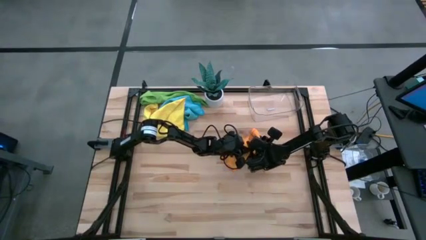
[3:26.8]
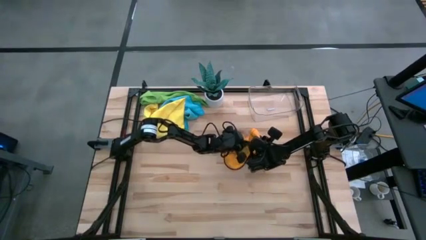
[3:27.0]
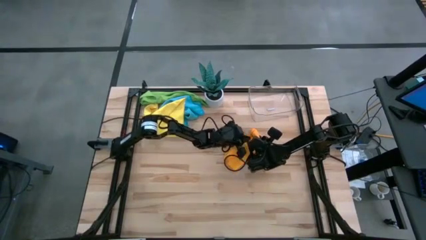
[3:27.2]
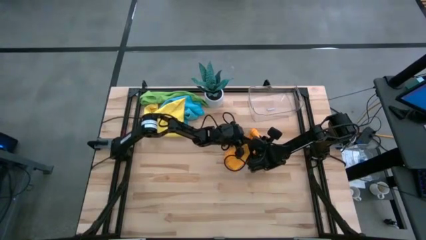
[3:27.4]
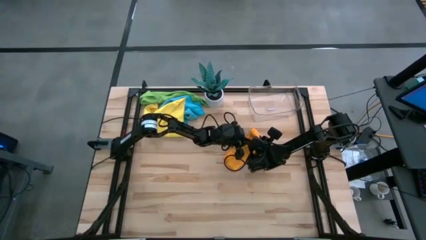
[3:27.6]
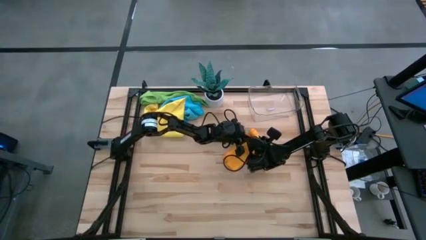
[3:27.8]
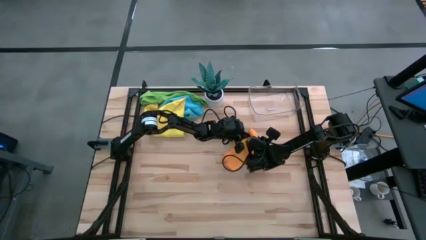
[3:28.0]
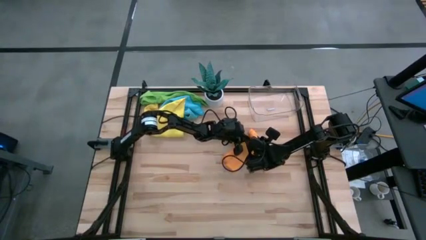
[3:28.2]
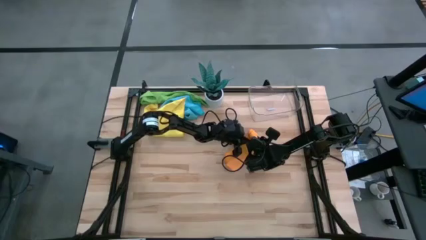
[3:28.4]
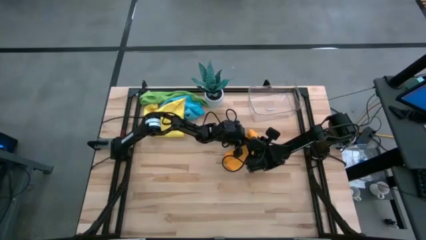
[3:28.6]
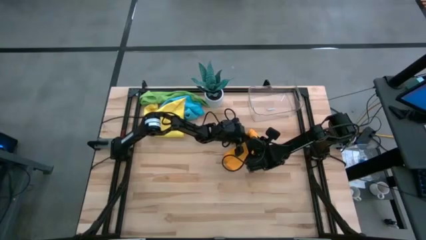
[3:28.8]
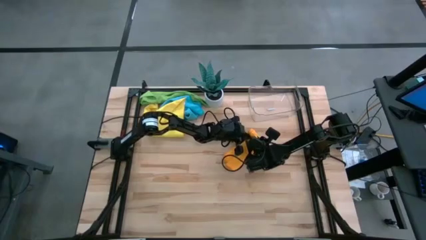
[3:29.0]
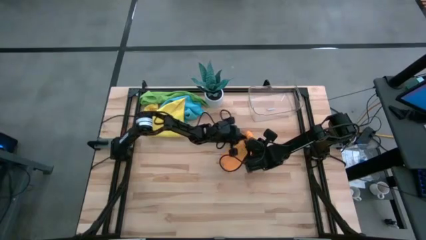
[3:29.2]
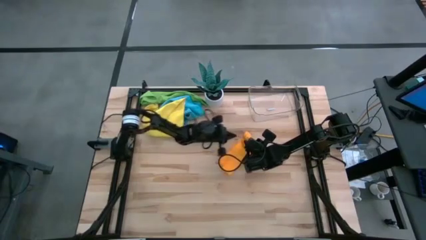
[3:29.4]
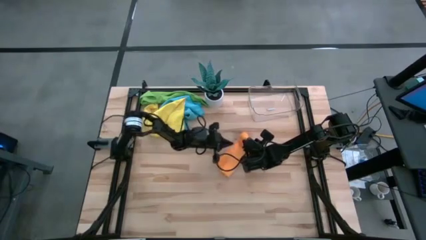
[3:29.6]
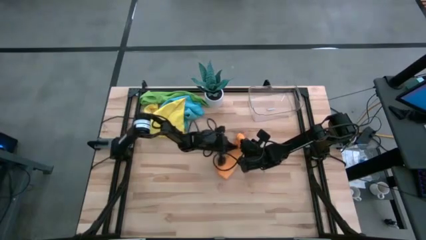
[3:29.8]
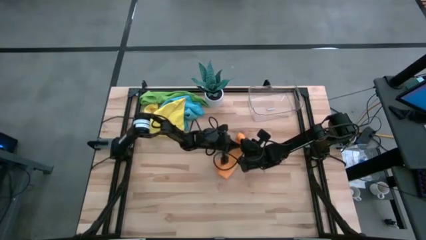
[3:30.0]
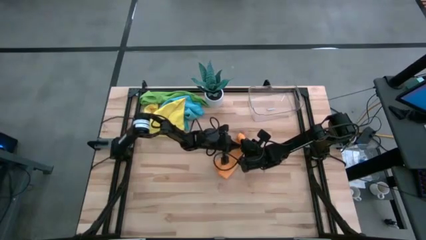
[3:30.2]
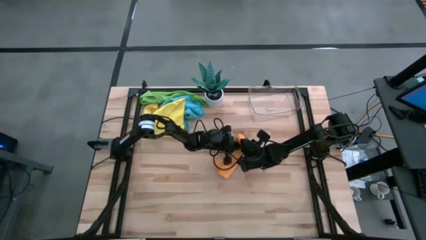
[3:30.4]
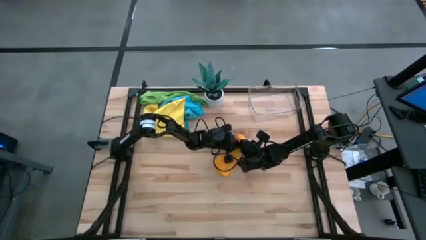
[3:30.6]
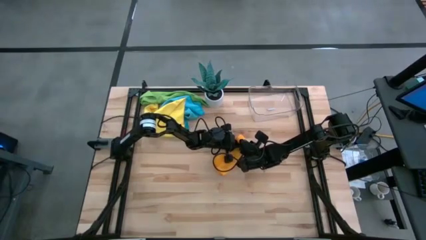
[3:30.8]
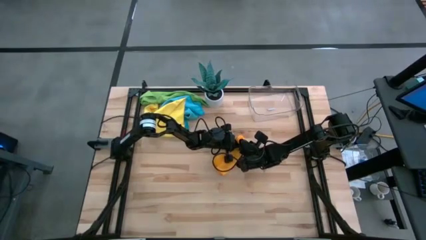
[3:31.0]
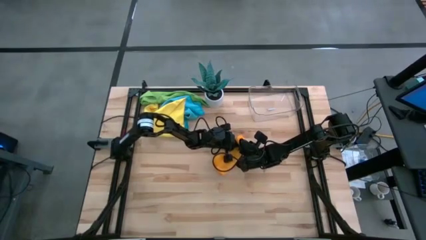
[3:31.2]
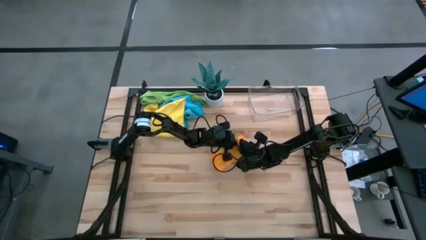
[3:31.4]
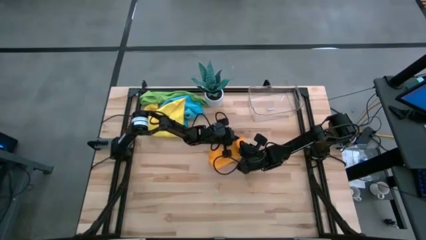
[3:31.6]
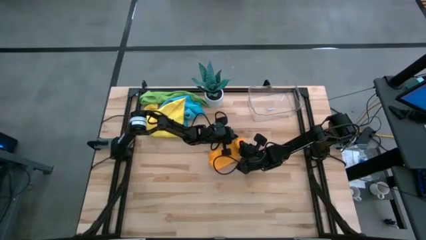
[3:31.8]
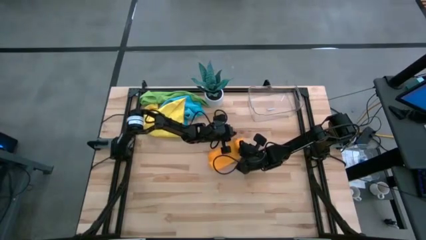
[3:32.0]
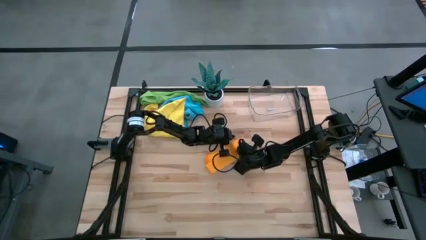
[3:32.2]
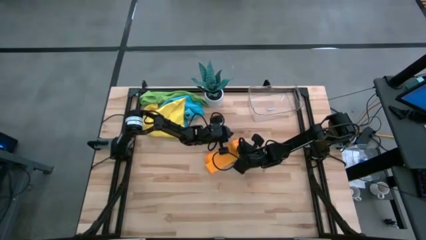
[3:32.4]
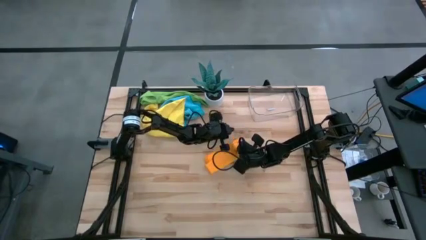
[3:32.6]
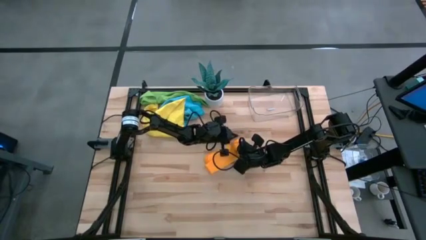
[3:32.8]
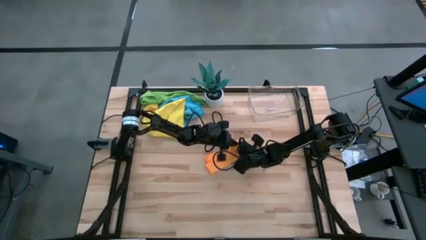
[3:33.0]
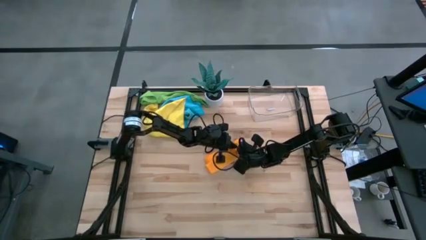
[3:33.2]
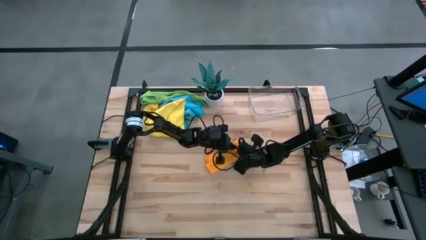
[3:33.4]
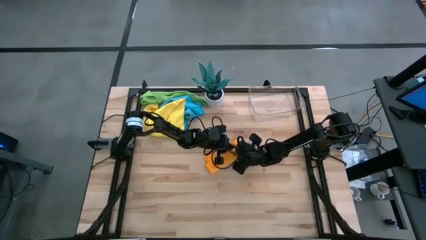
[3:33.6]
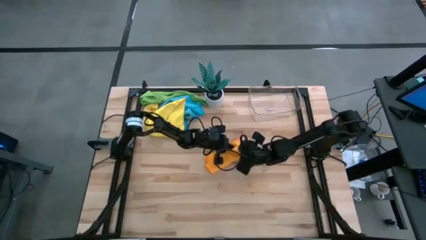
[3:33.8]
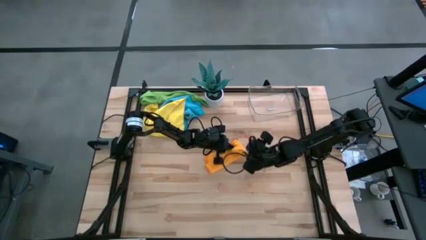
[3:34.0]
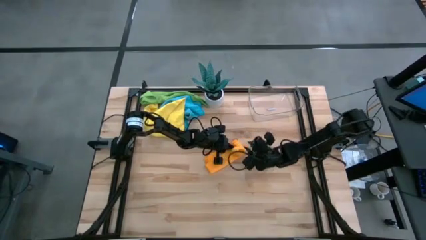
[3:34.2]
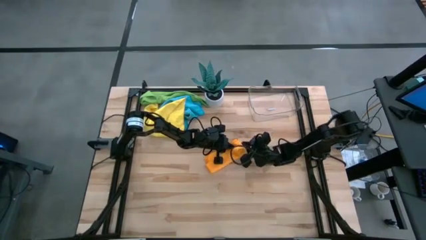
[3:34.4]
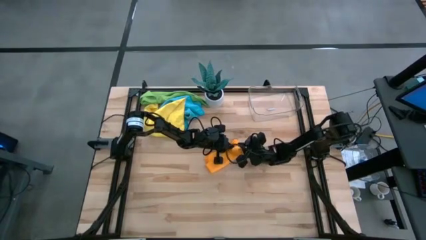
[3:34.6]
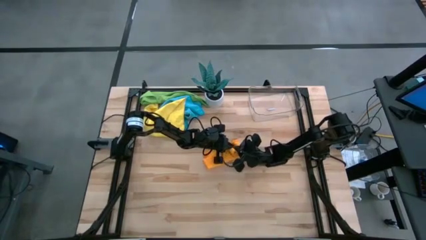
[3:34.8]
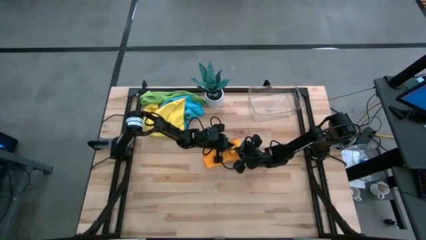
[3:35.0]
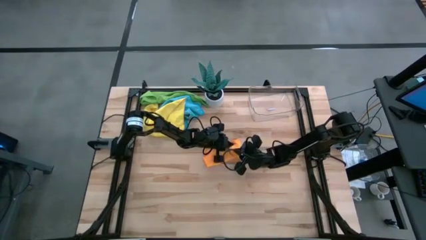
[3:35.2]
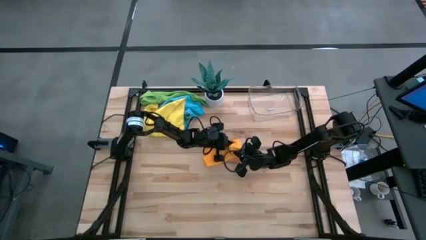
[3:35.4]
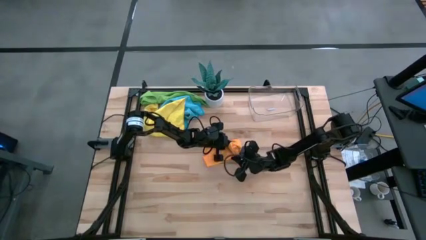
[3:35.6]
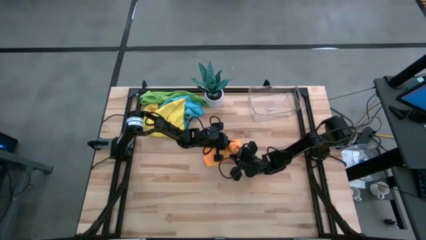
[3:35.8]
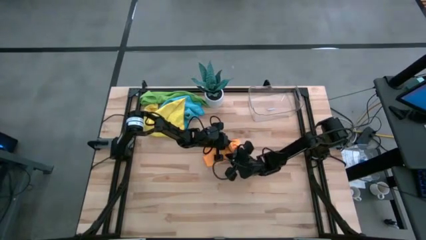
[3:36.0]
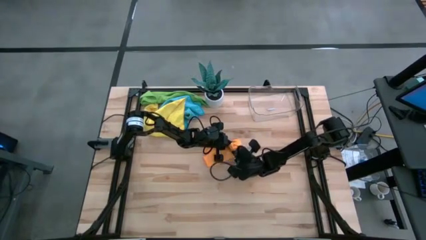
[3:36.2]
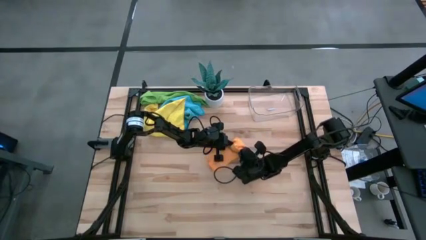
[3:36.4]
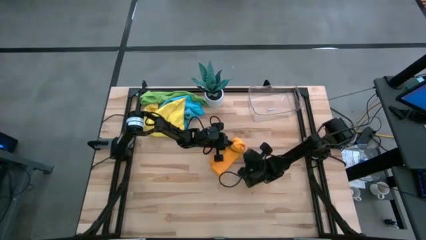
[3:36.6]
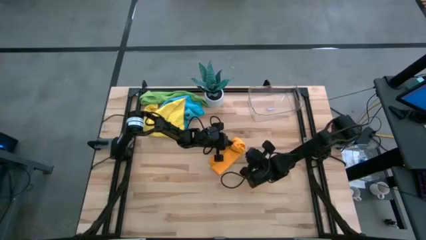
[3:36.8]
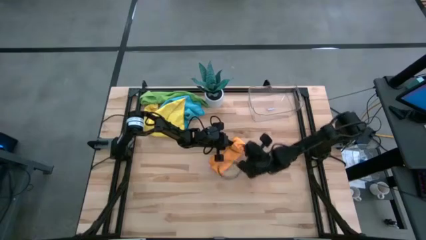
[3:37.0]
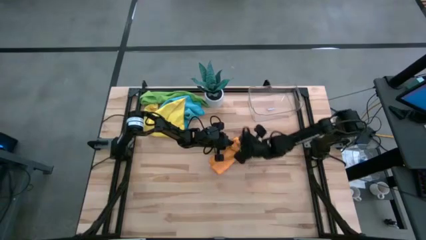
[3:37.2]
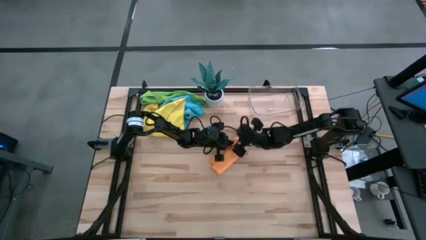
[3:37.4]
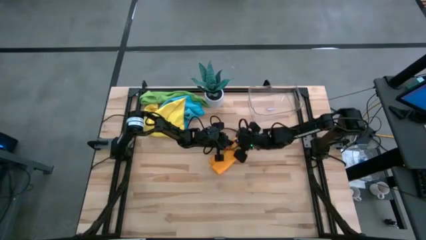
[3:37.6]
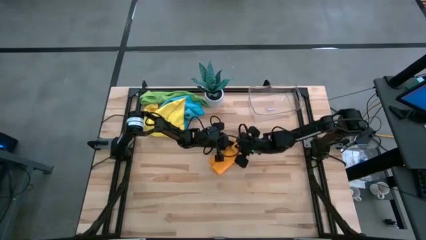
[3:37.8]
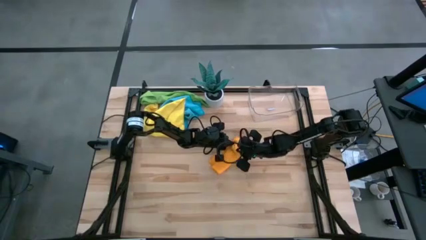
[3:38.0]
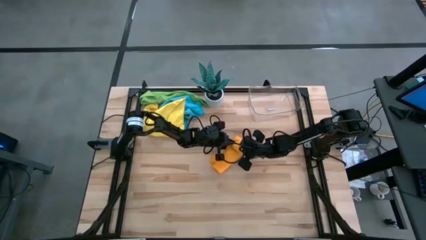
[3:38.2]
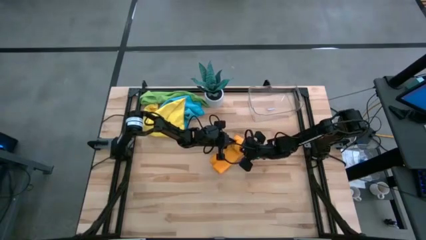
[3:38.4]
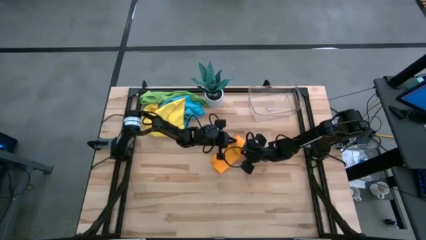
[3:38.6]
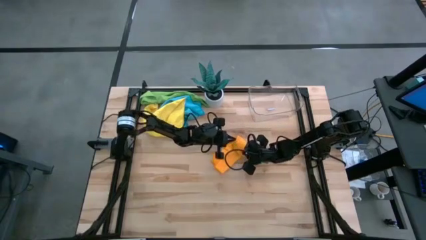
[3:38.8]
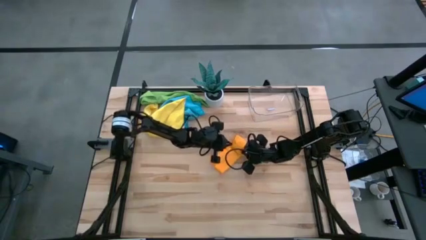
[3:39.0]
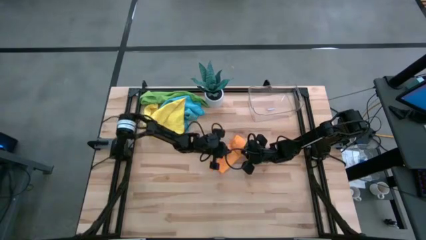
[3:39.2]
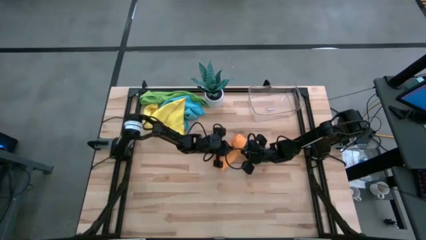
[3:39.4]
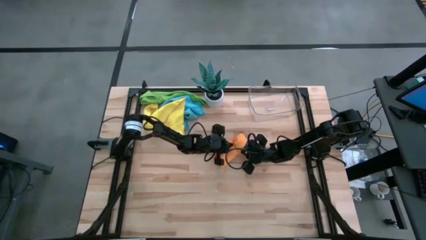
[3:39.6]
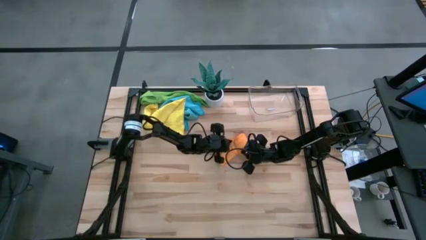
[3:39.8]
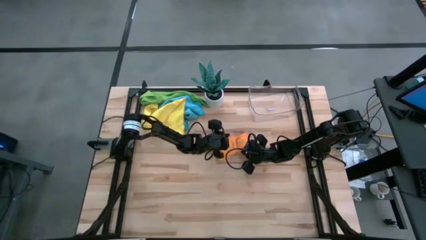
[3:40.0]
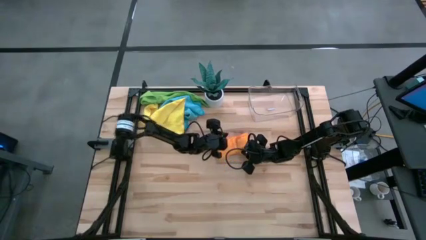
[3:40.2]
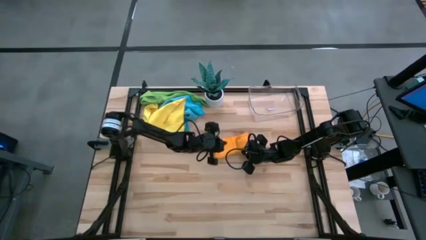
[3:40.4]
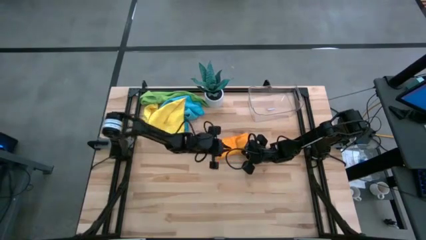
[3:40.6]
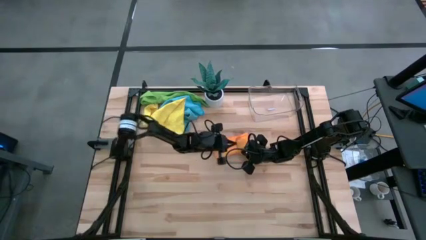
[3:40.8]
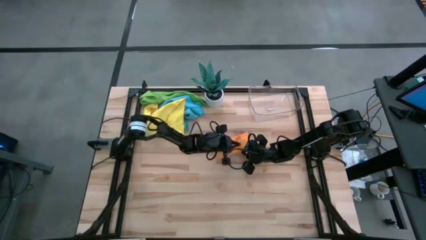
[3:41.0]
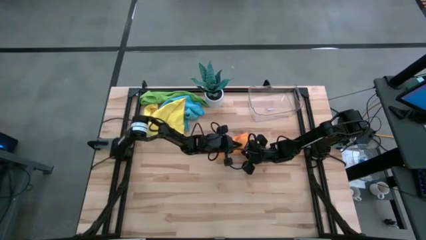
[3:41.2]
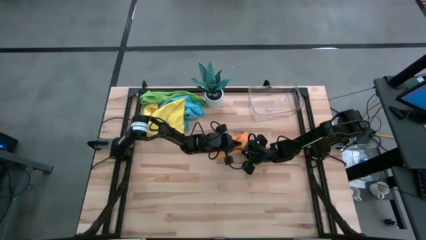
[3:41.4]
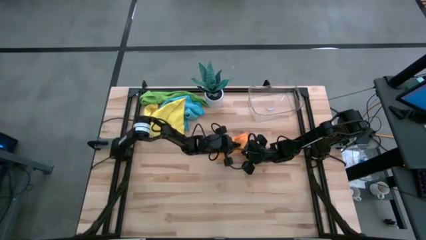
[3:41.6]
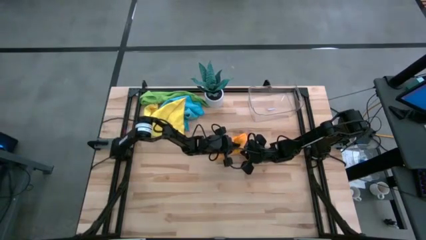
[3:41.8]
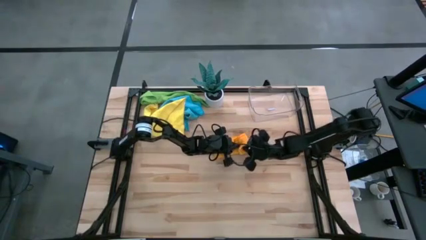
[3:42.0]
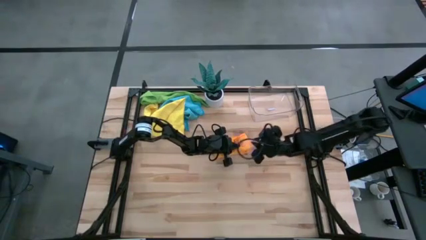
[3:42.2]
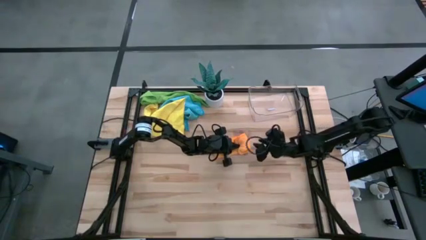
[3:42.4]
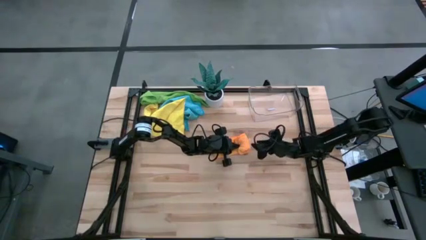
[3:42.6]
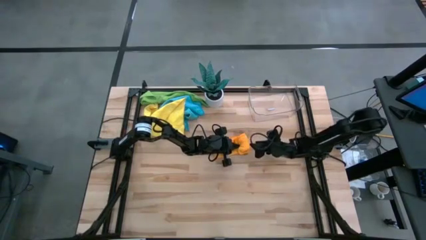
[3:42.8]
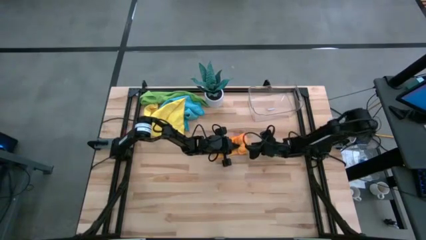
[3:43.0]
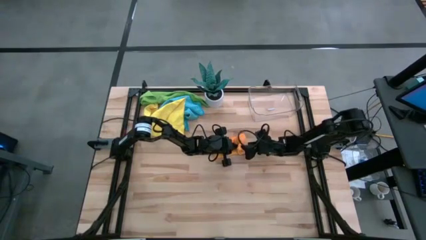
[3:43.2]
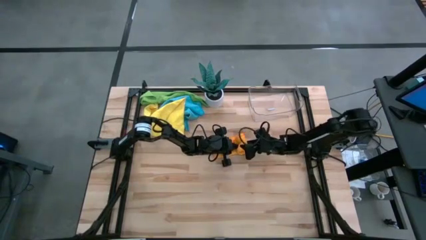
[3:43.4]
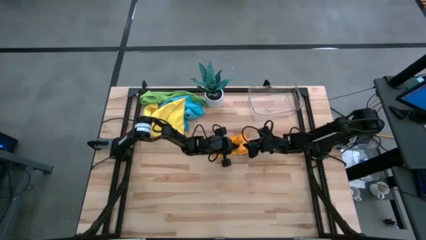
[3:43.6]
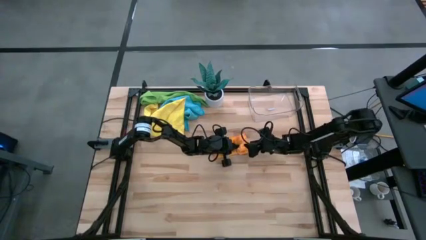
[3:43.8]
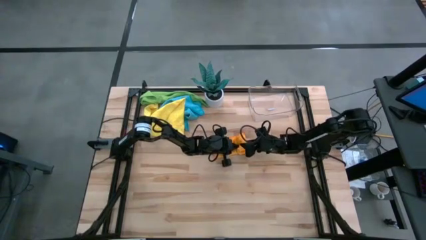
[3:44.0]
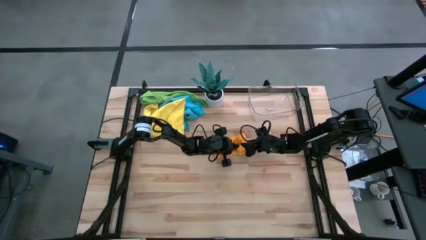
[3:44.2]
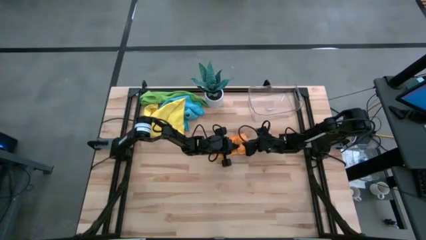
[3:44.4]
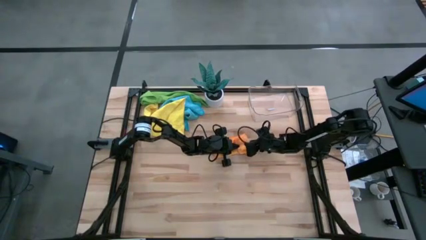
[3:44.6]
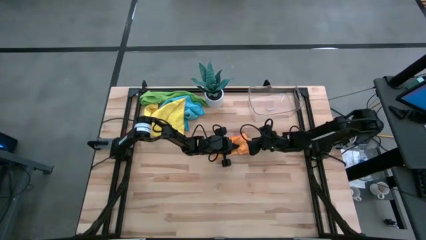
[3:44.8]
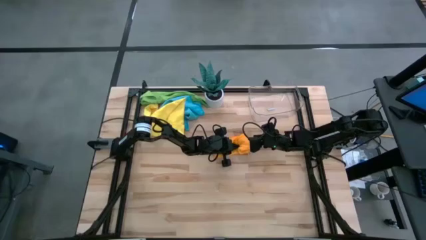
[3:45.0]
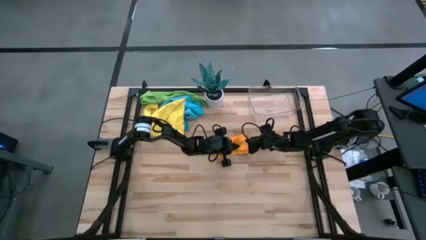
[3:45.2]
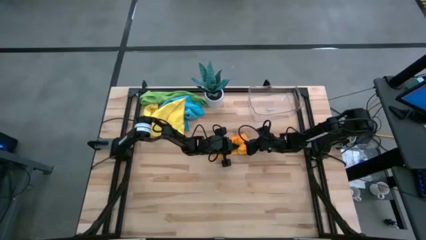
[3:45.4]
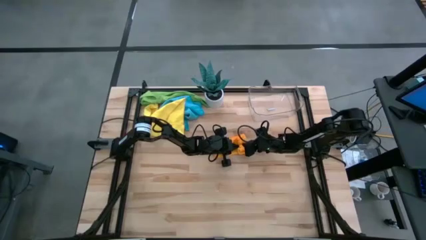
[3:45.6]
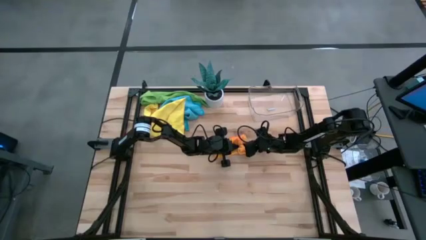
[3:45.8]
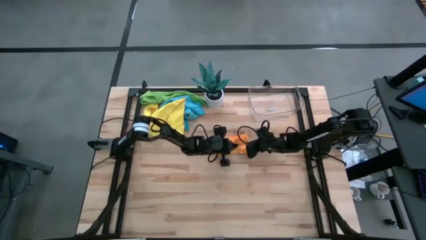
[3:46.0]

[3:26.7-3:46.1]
Task: Roll microfiber towels into tight, uniform cylinder then place into a basket
Roll the orange microfiber cloth
